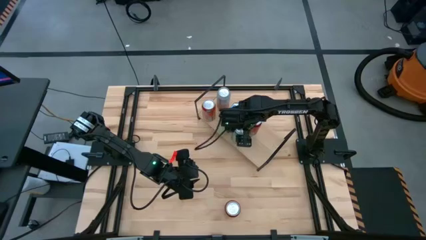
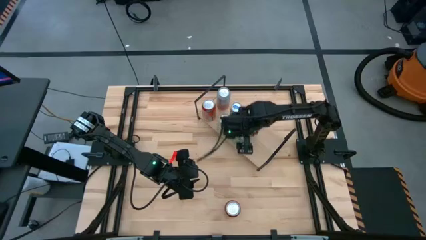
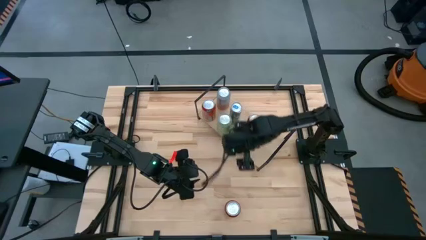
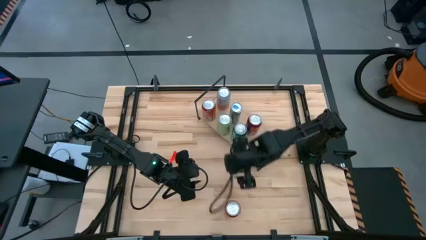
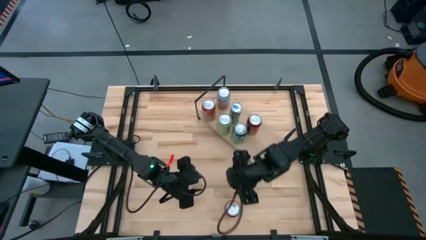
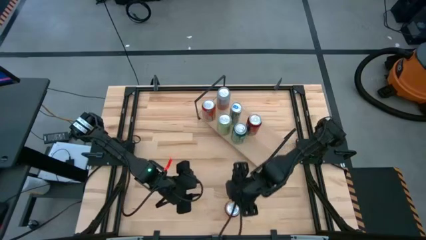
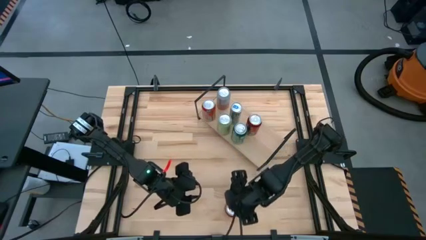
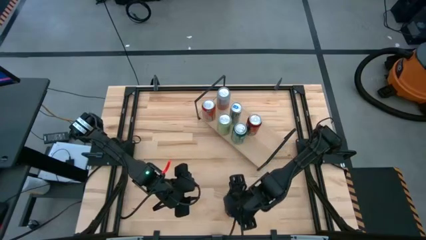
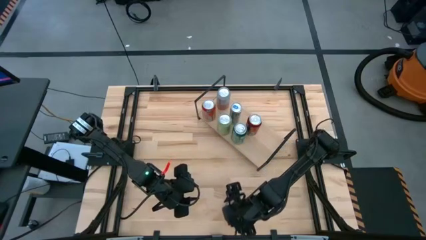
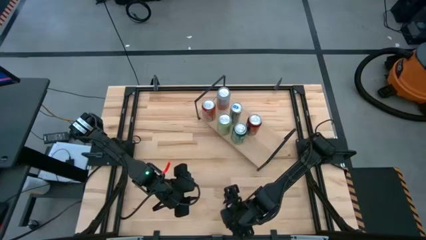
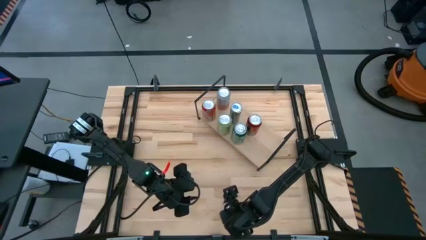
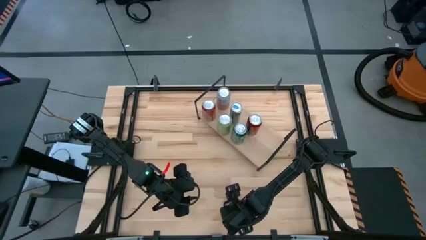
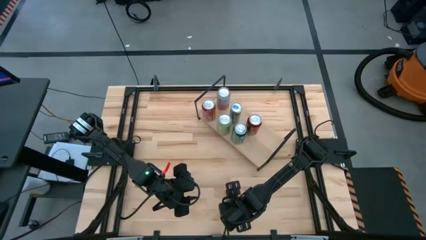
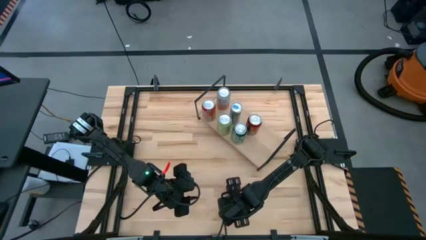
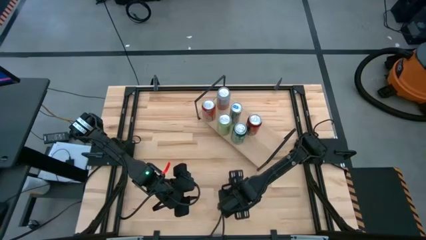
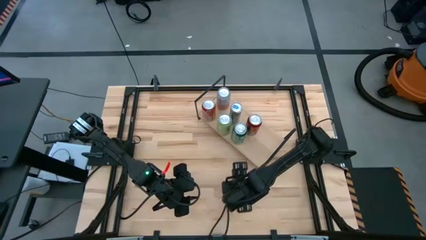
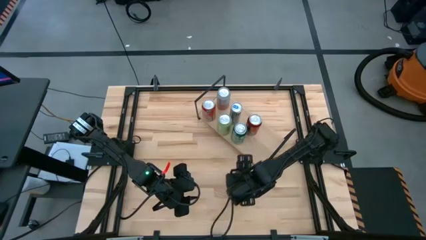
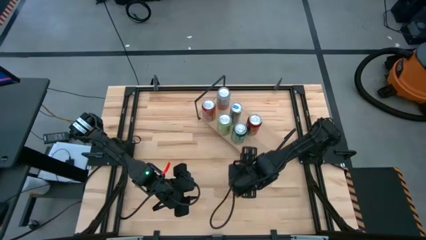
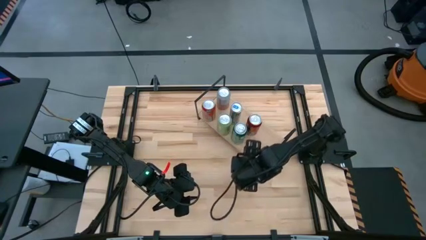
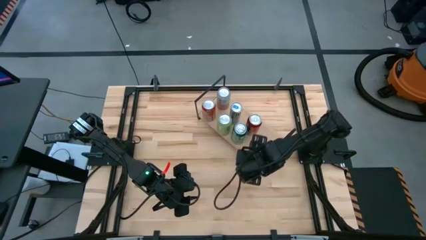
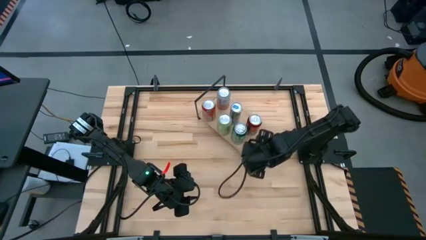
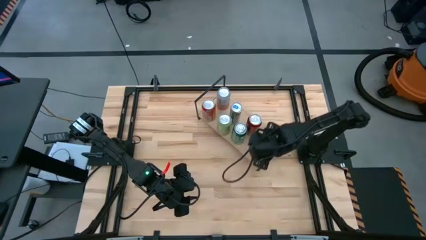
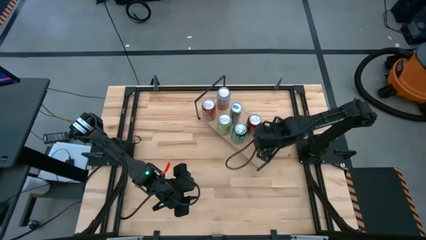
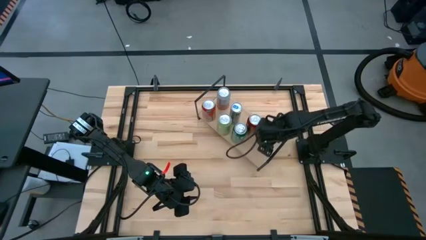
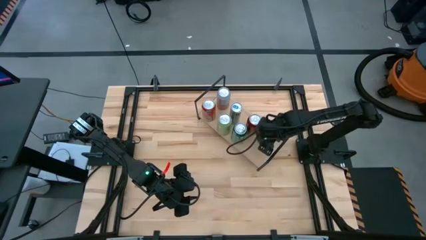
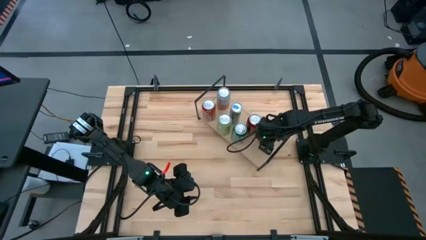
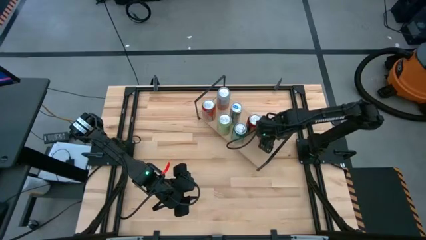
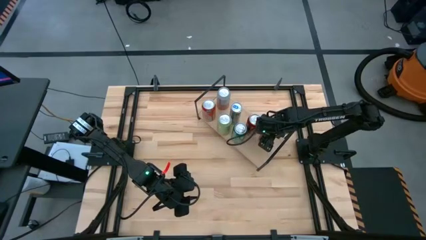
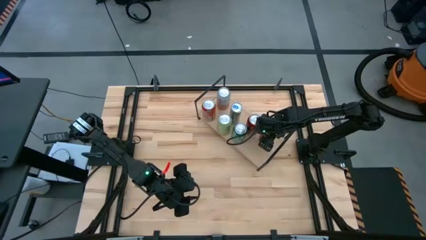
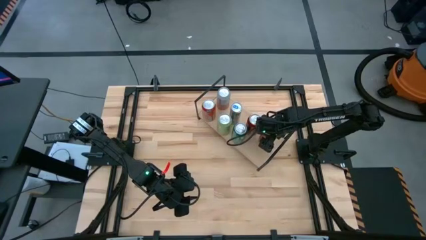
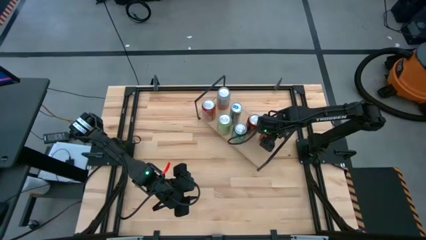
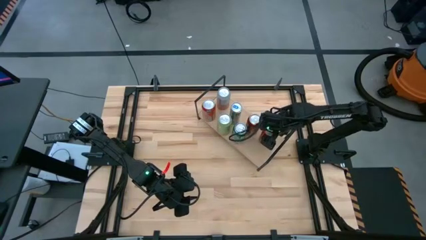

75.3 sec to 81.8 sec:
Task: Place canned beverage on shelf
Put the orange soda can on the shelf

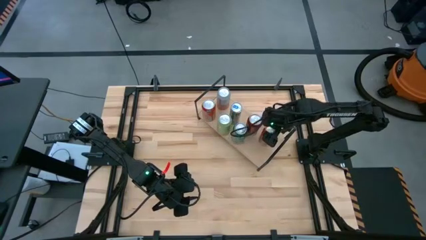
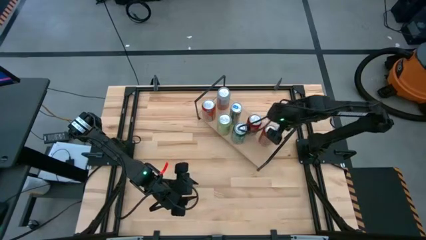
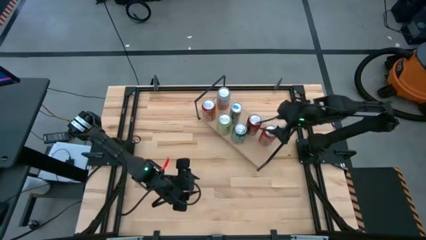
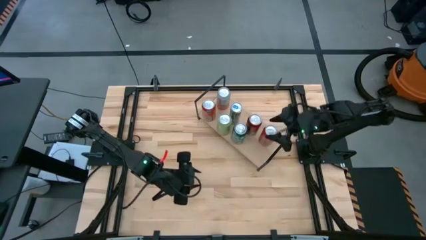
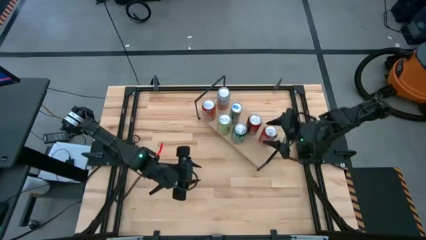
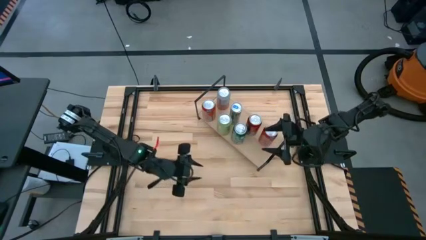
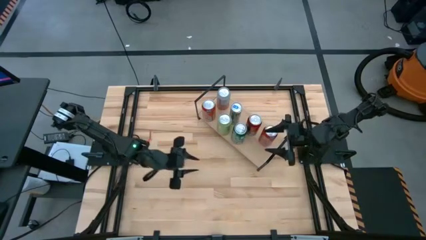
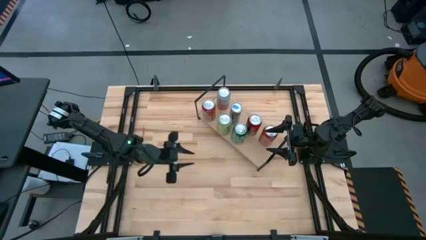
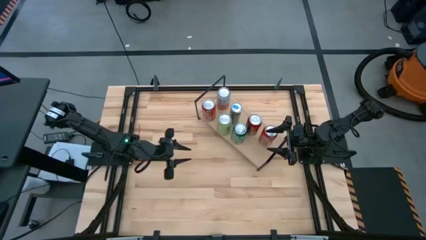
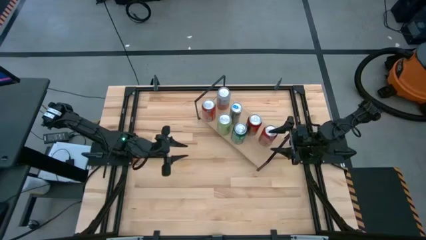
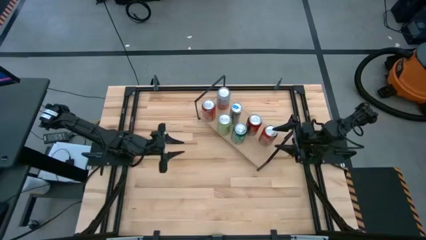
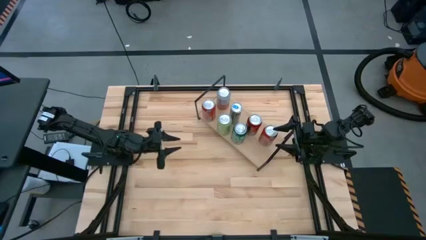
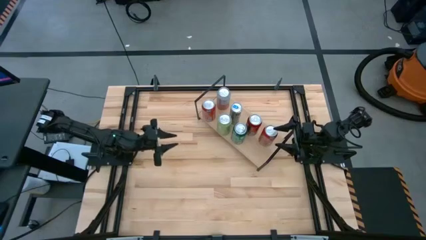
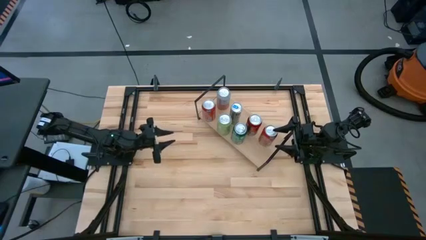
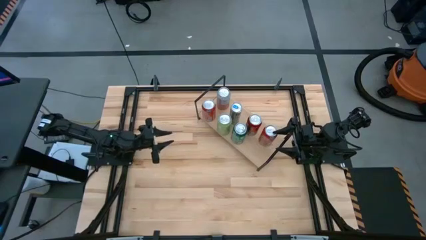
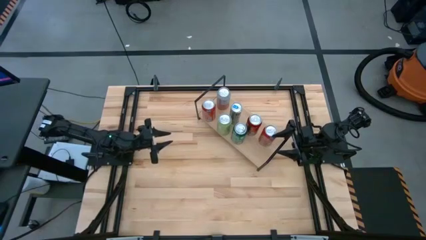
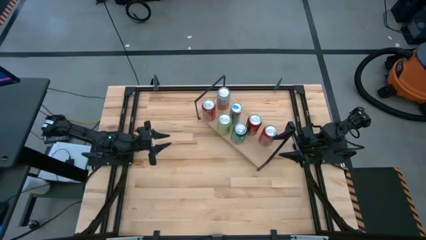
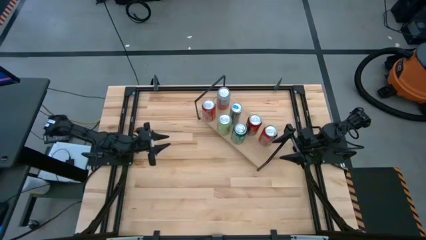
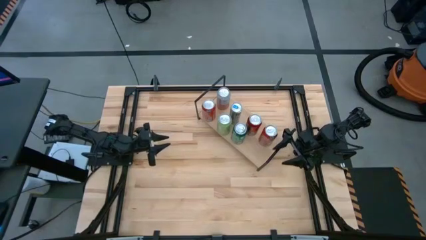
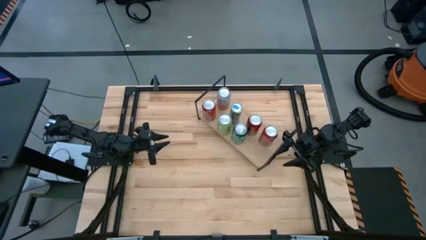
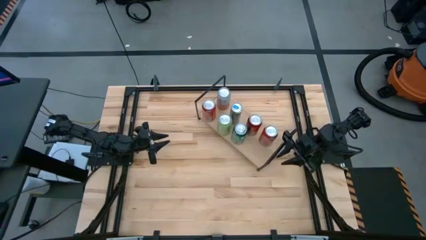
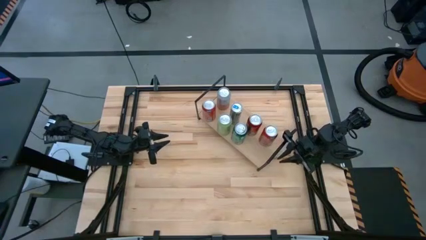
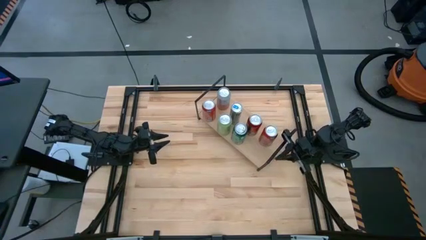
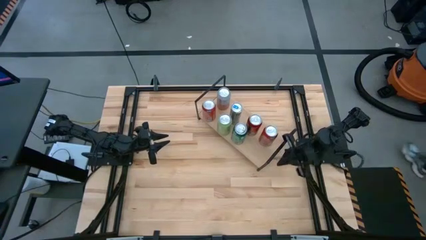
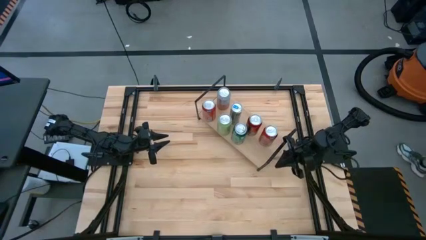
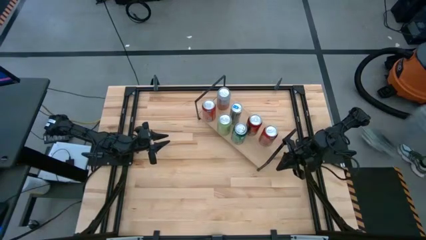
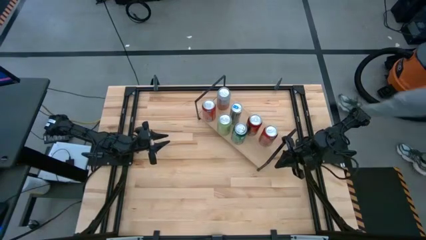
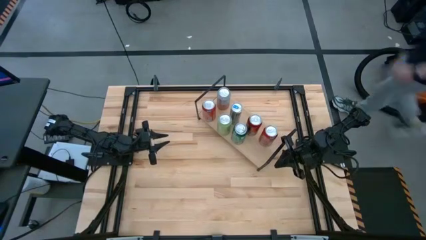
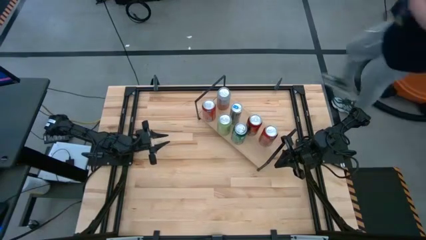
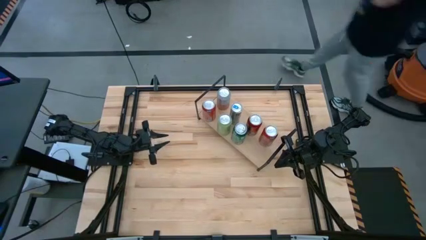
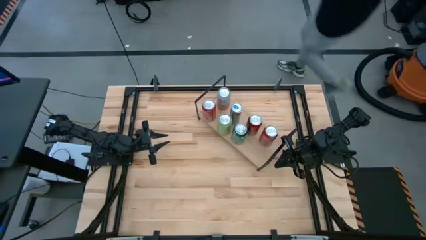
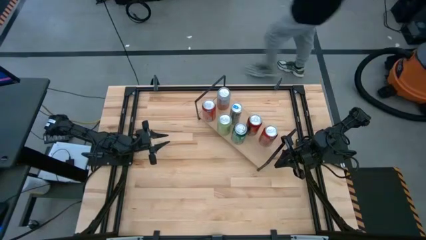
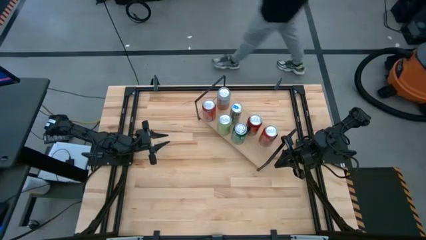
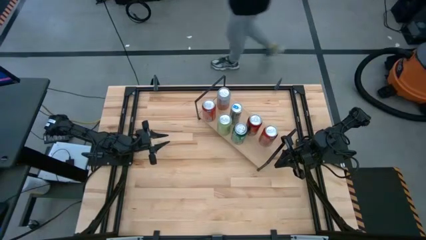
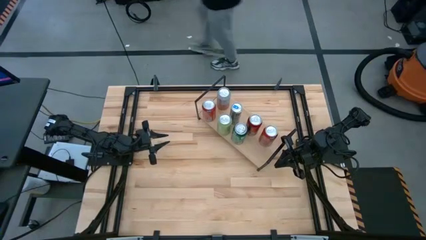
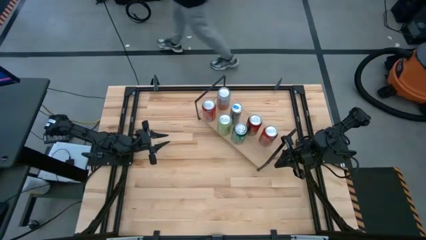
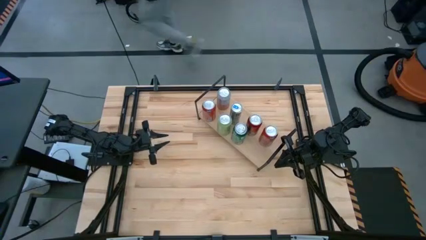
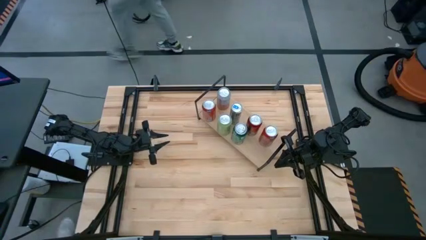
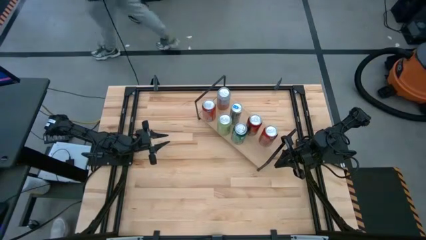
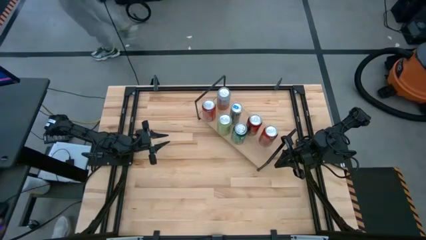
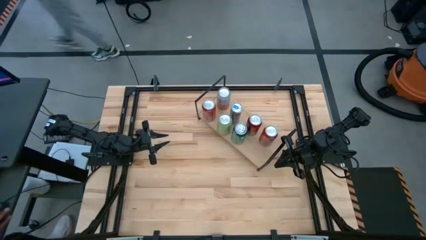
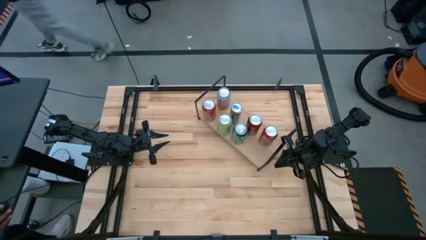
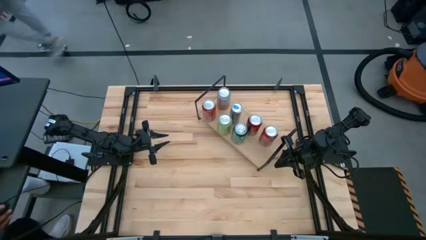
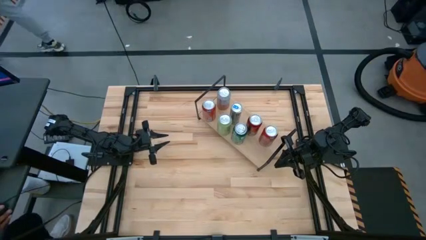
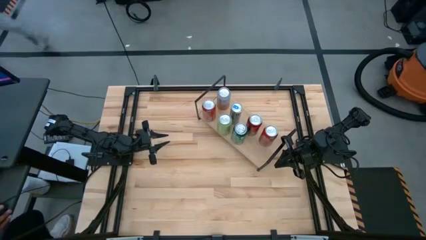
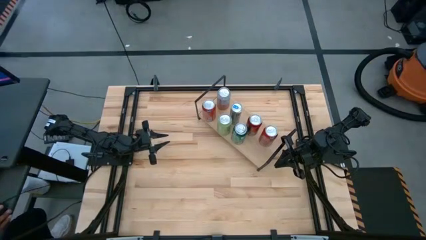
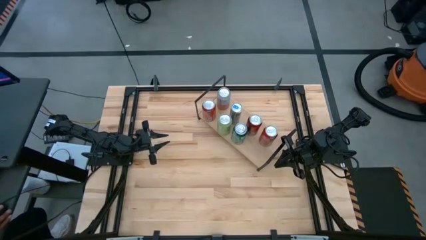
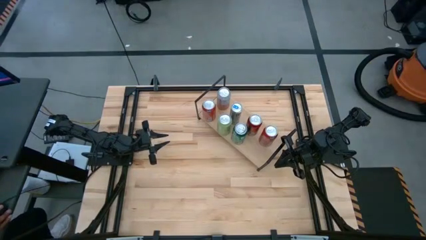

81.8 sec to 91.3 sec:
Return to Home Position
